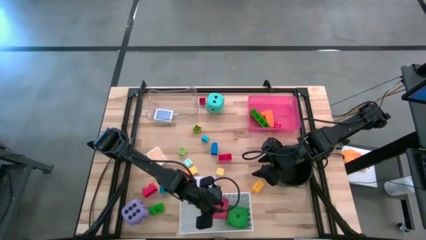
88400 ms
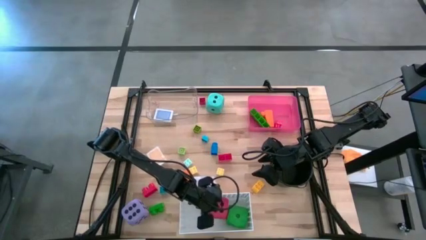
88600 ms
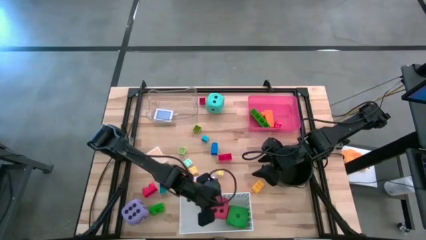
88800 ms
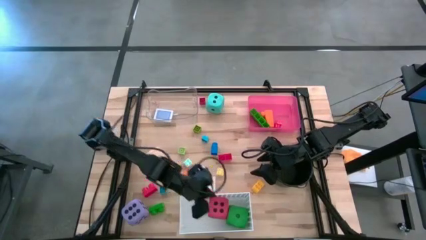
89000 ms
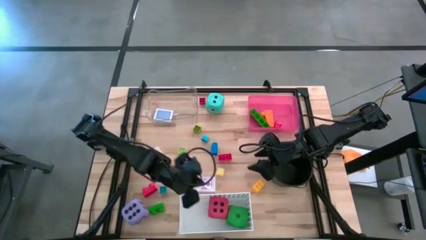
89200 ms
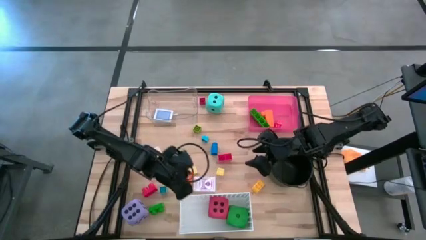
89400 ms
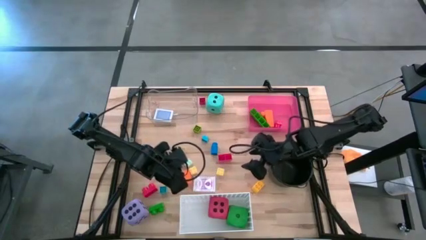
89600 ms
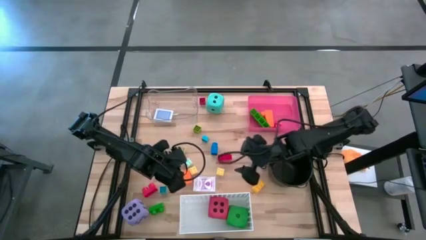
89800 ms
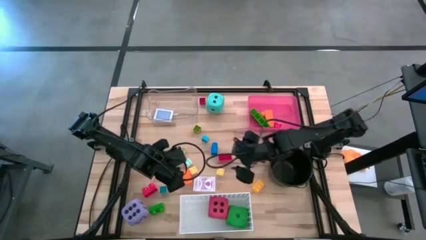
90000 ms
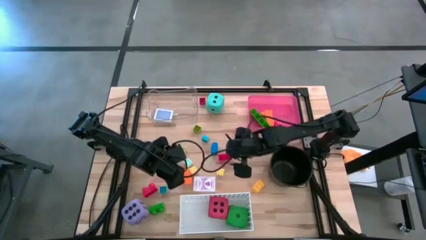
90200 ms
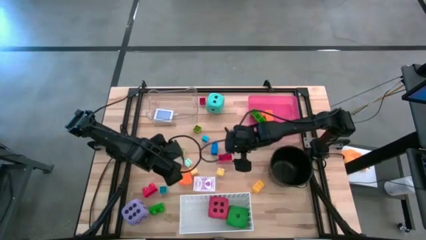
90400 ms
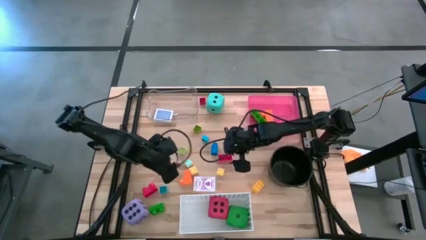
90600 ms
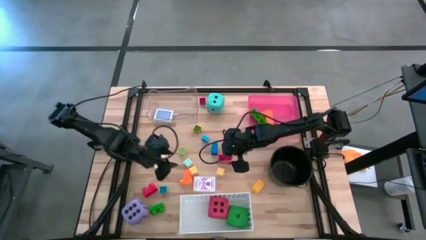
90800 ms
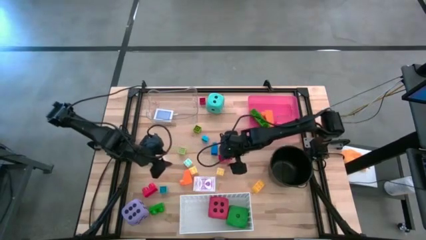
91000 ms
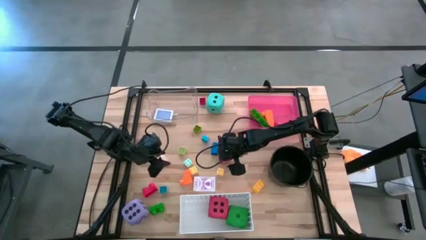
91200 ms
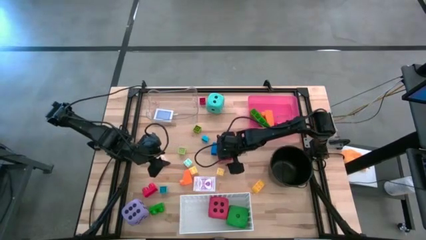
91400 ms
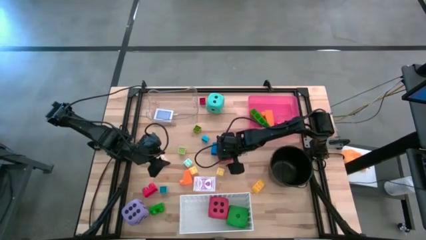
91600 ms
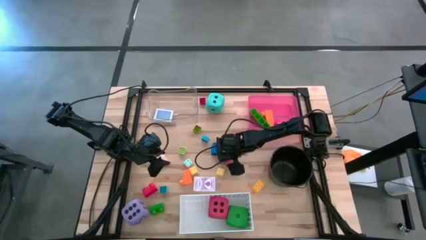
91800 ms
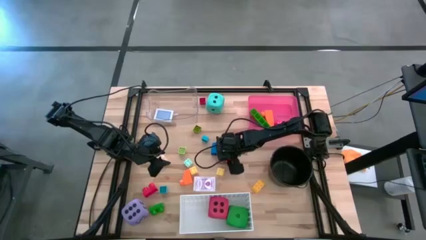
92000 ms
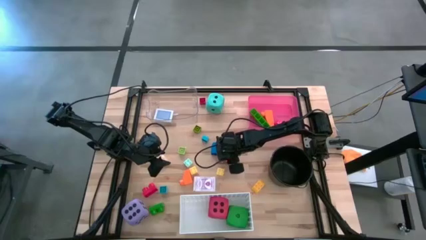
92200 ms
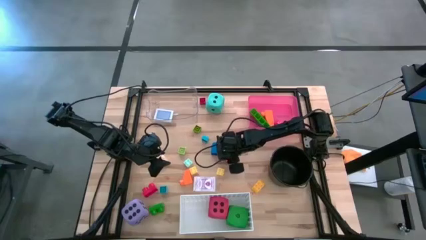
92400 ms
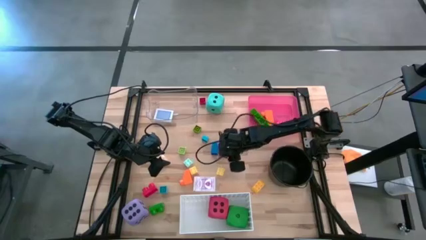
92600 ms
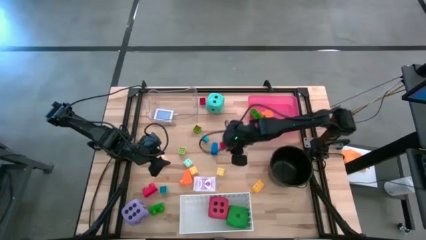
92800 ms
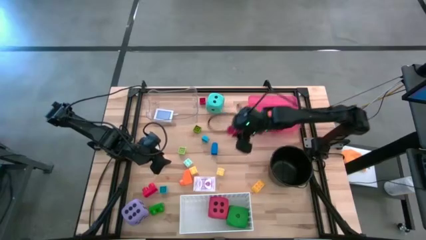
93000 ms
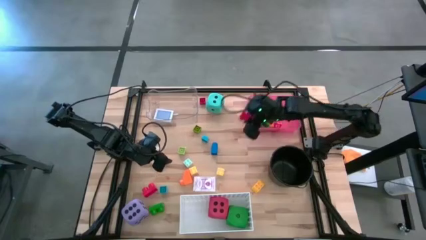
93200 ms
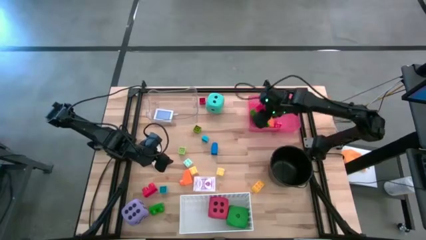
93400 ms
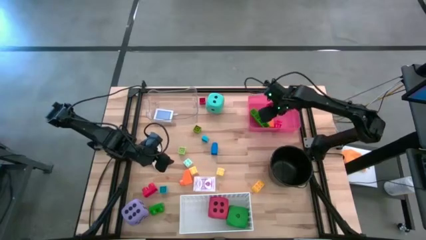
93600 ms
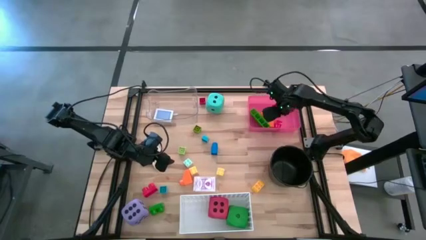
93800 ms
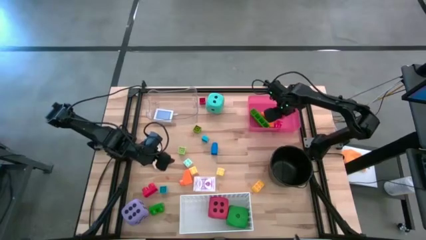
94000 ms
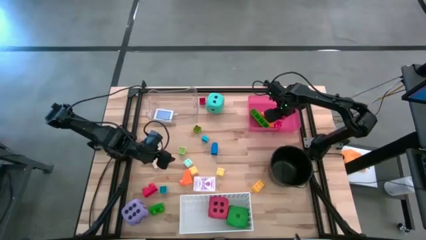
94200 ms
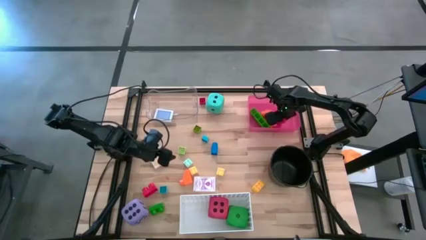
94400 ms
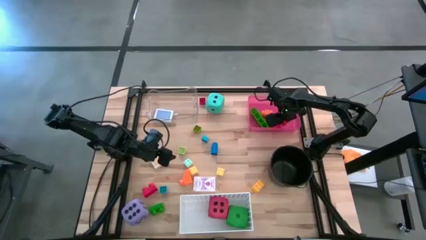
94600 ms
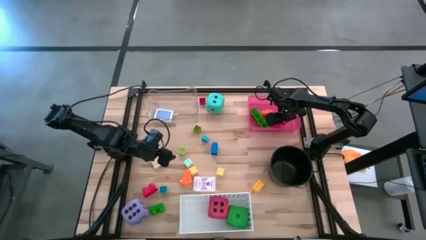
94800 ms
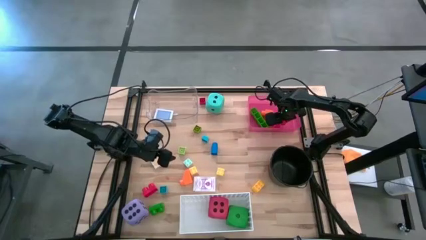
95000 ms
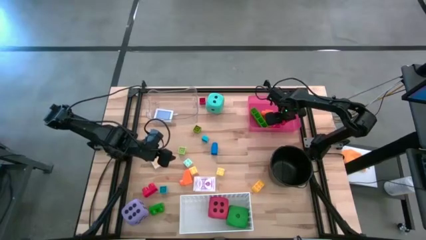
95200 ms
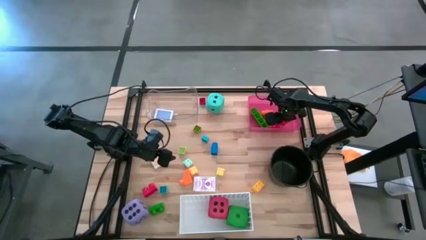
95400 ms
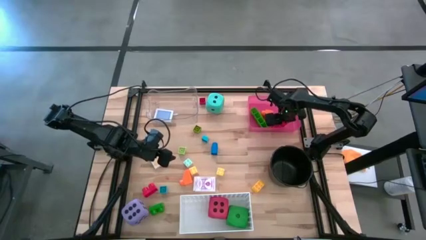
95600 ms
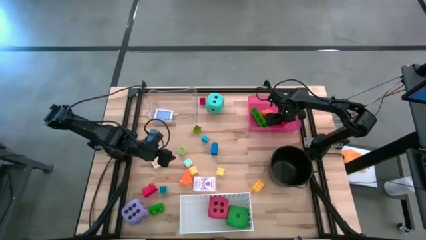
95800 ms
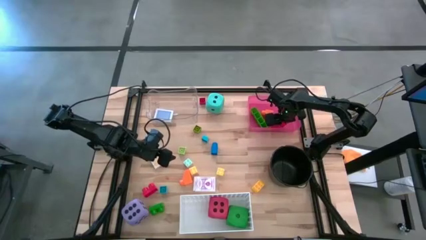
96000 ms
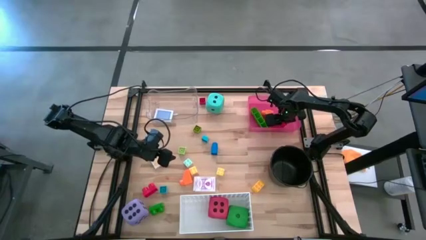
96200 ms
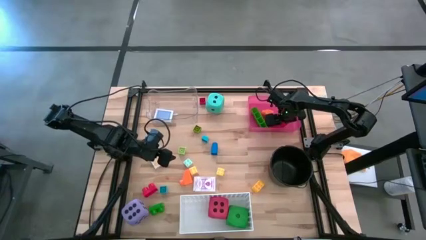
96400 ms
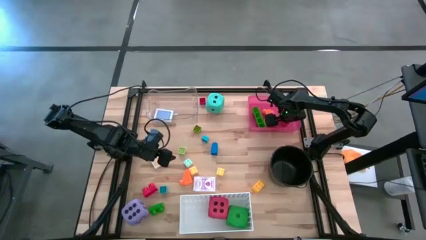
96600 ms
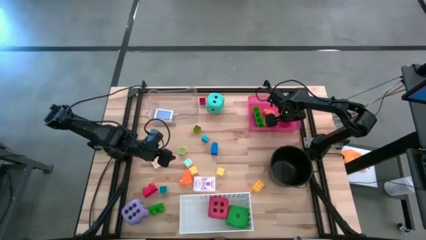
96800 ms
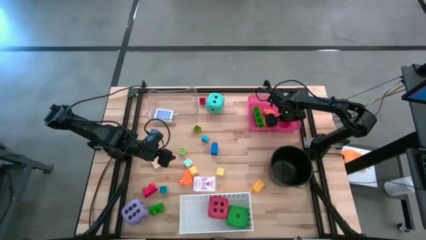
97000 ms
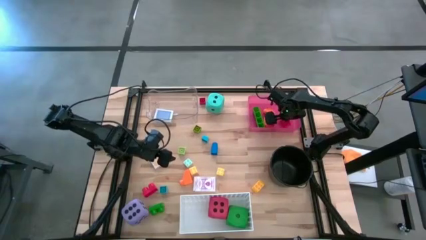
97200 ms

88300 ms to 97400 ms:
Task: Pick & Place Toys
Put the red game piece into the red bin

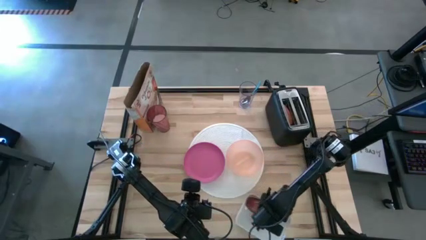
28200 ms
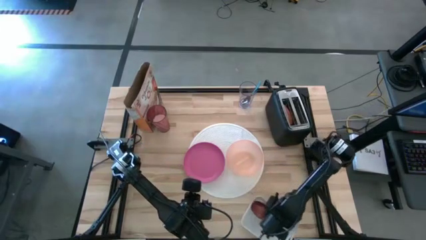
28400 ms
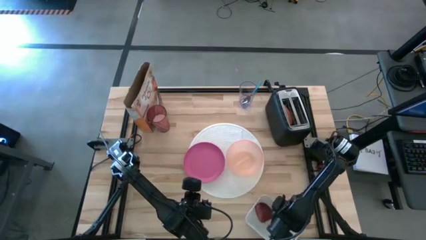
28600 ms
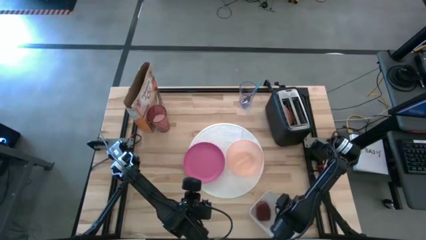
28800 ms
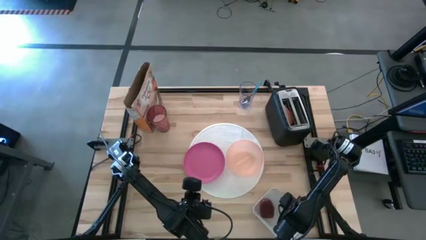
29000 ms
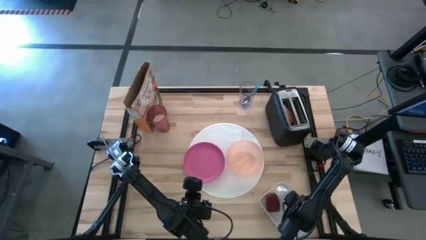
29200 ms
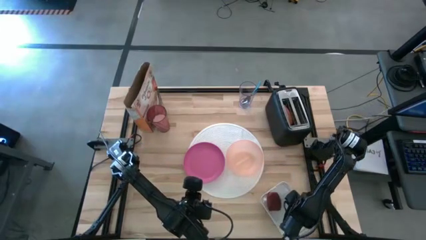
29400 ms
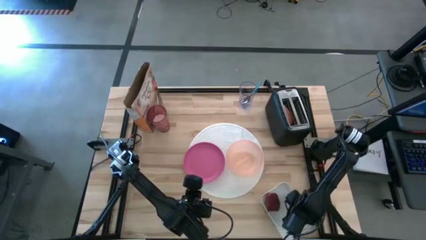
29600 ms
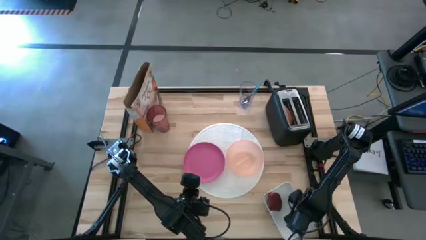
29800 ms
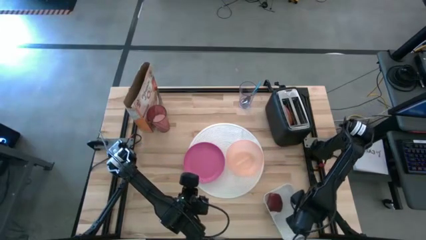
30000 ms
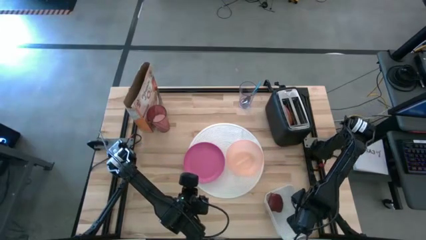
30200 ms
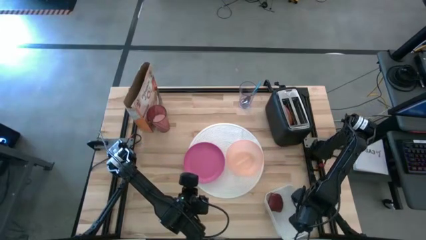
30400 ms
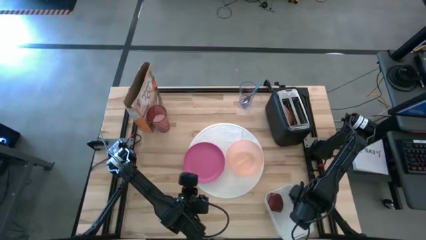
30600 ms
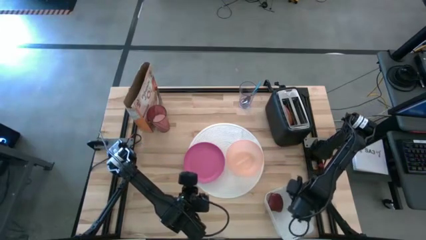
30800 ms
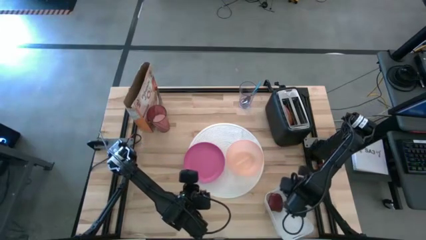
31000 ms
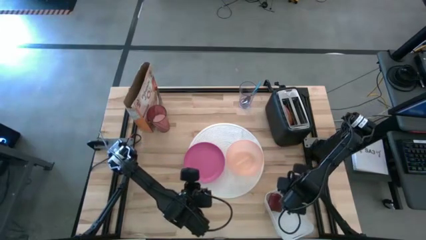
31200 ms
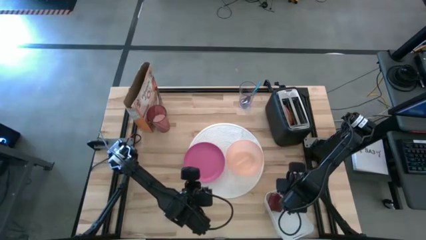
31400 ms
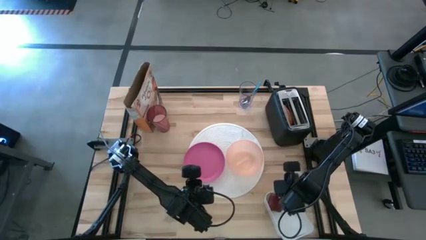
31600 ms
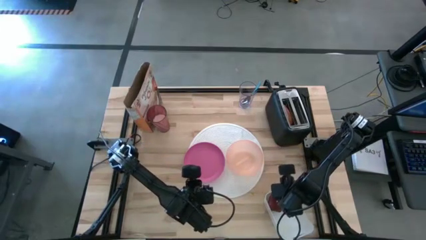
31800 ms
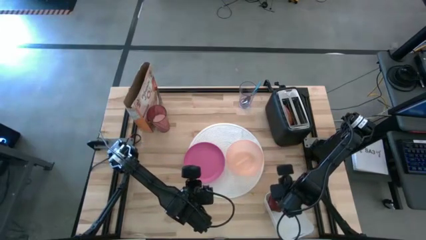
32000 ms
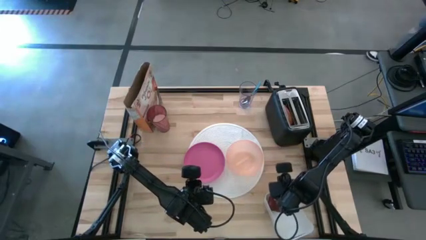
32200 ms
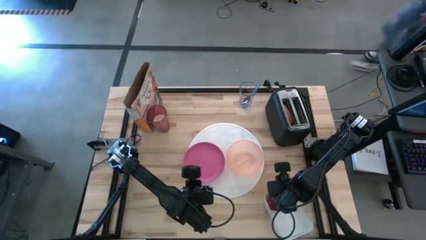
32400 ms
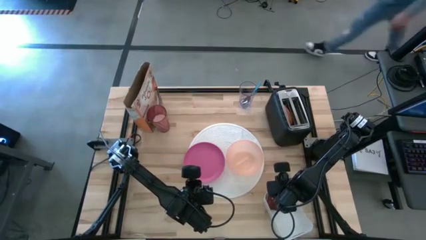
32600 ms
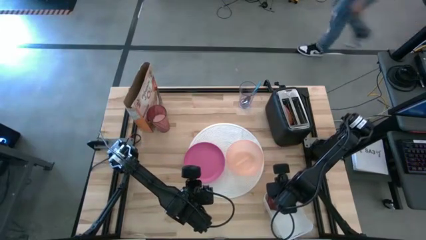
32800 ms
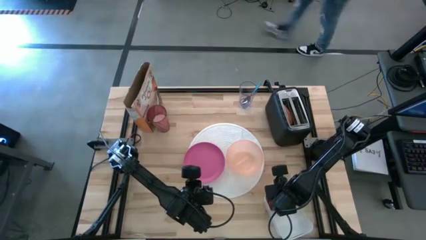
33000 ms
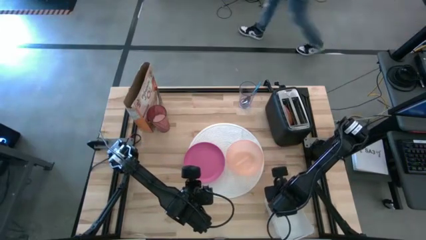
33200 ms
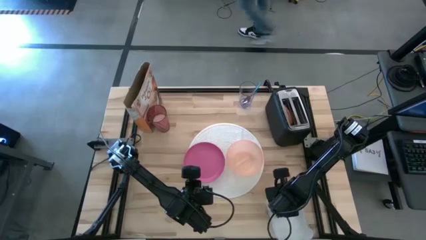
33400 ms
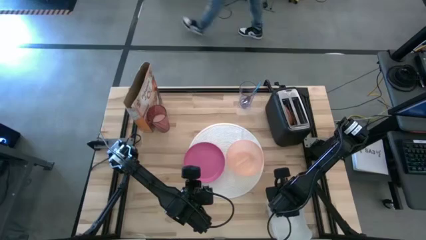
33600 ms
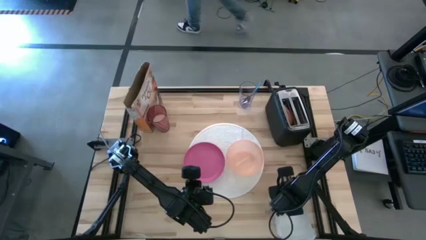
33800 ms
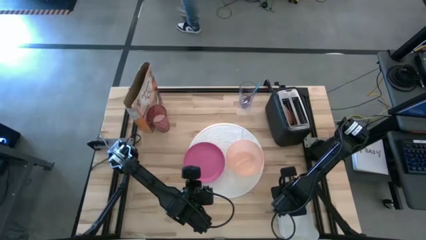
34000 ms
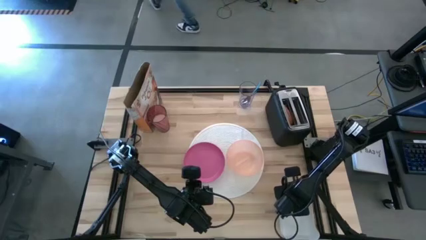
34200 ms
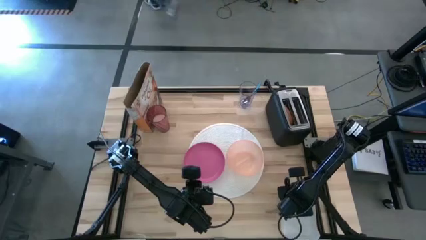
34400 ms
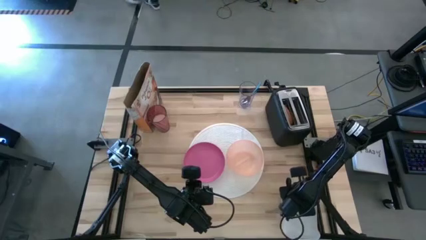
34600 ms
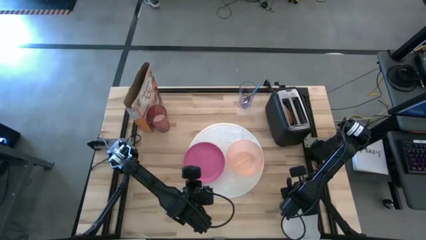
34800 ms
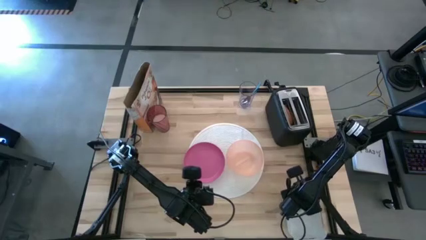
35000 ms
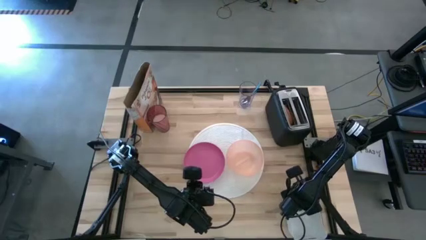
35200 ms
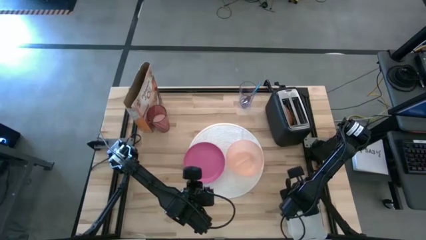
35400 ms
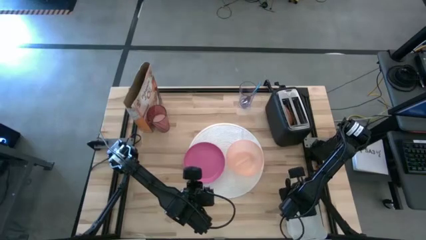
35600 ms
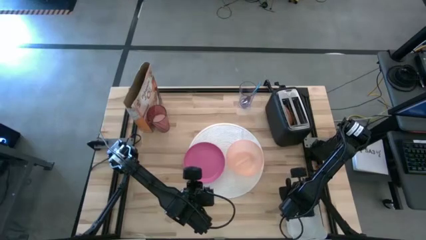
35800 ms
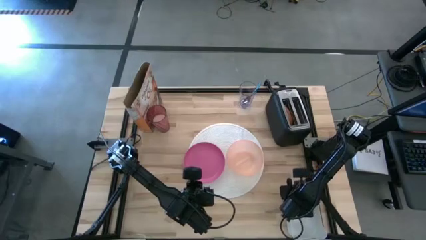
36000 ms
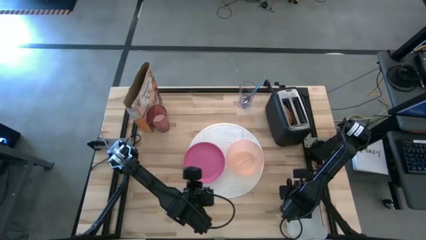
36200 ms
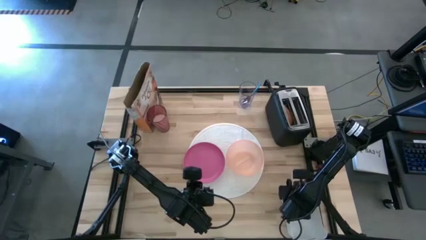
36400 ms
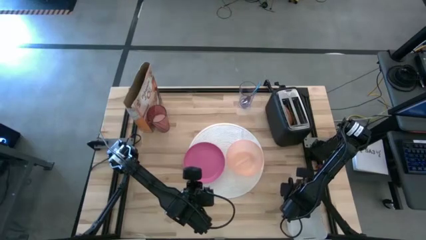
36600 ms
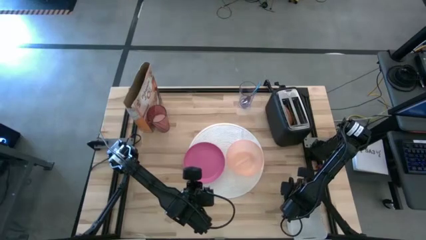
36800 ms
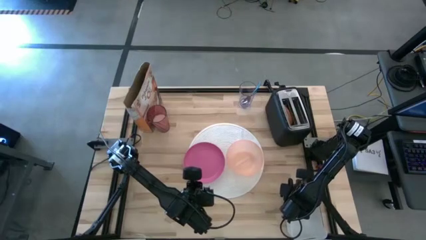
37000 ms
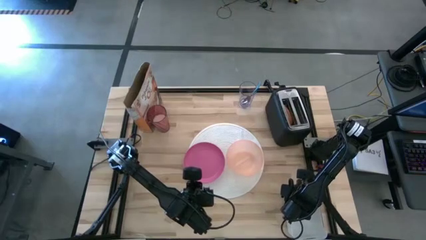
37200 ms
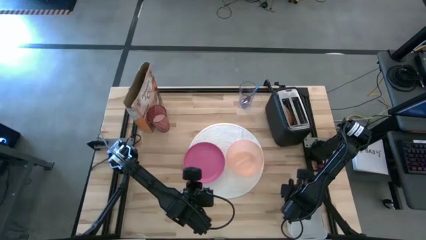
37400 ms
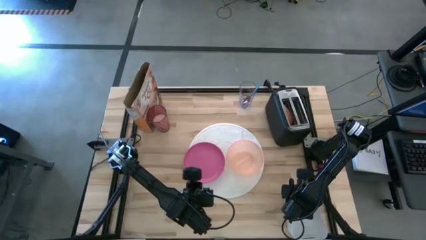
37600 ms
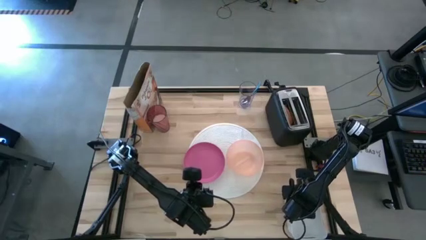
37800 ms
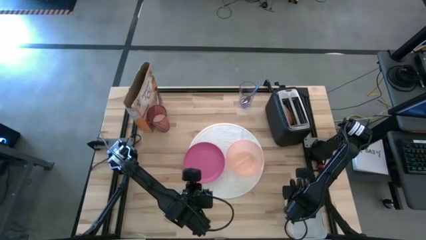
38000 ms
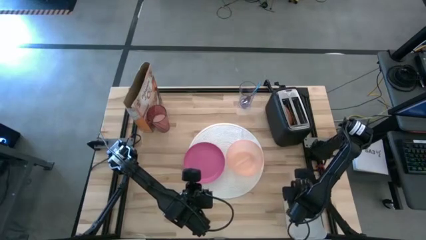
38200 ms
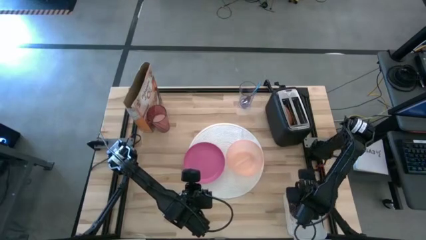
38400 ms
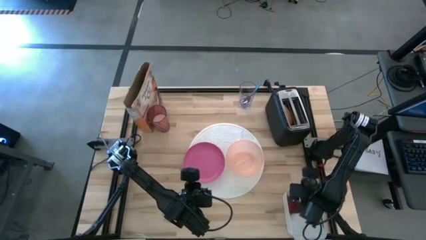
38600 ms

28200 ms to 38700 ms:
Task: Arrange a breakfast setting
Move the white bin to the bottom right of the table
